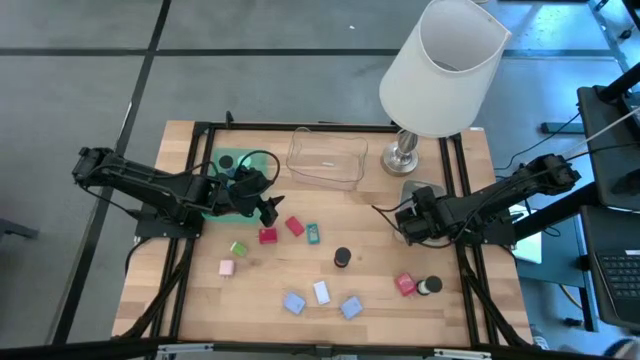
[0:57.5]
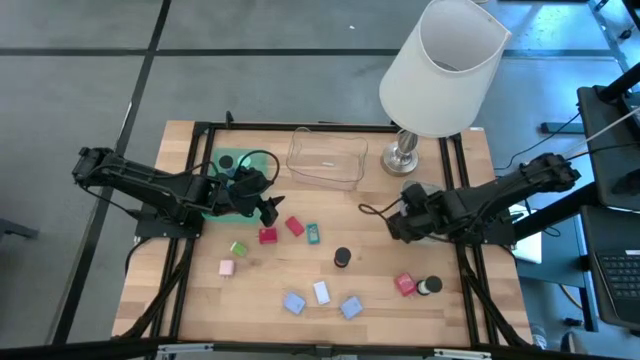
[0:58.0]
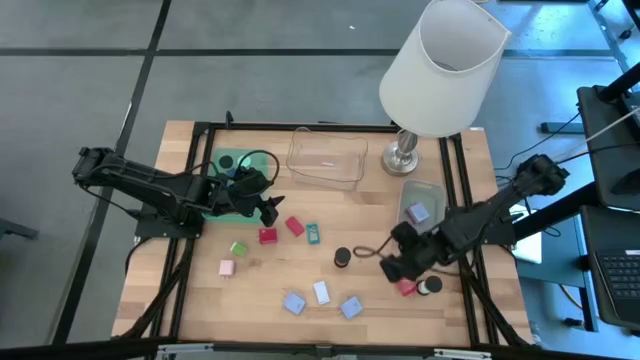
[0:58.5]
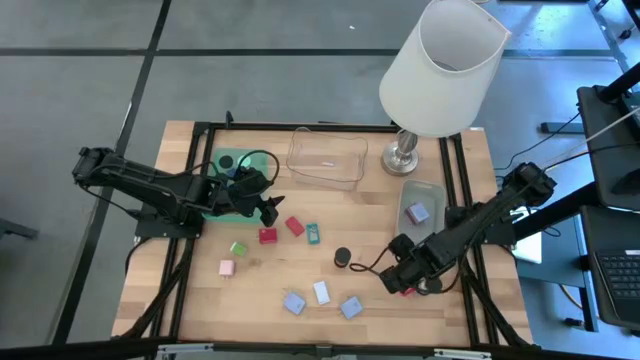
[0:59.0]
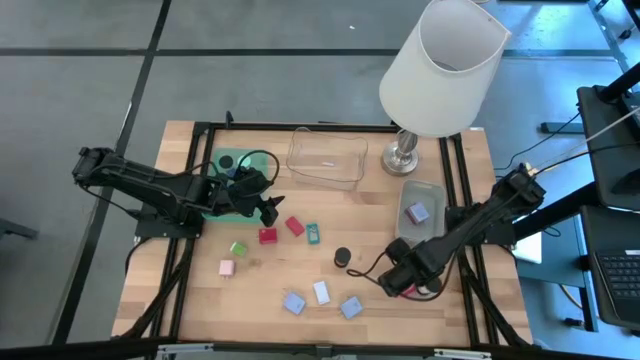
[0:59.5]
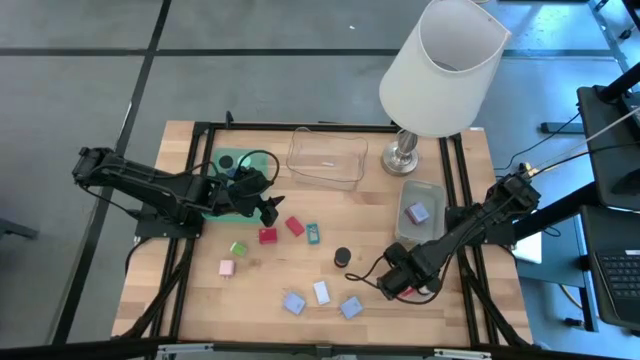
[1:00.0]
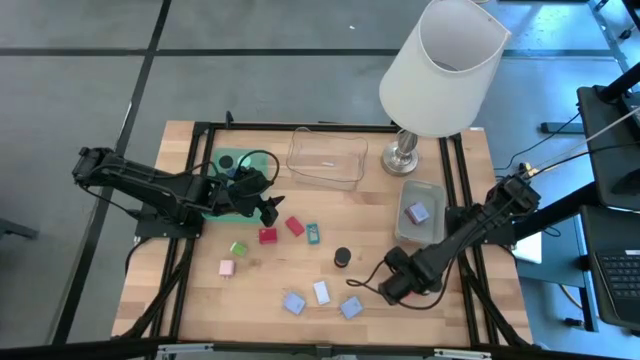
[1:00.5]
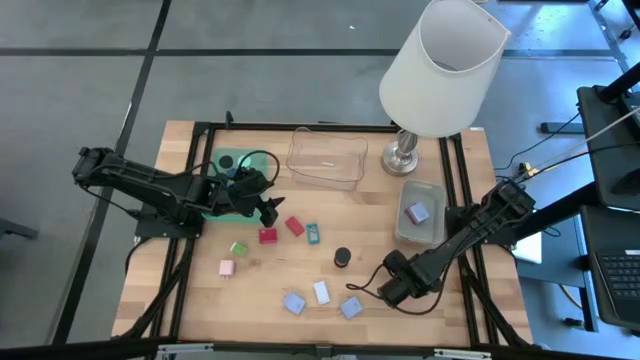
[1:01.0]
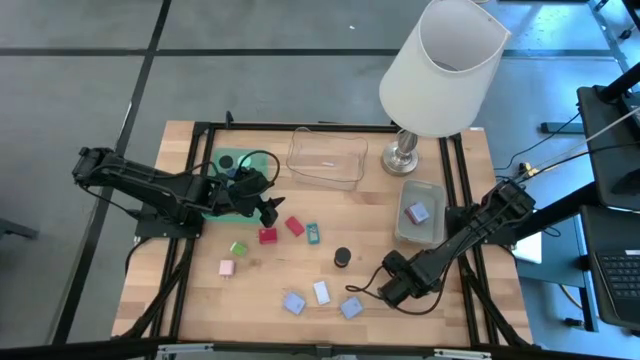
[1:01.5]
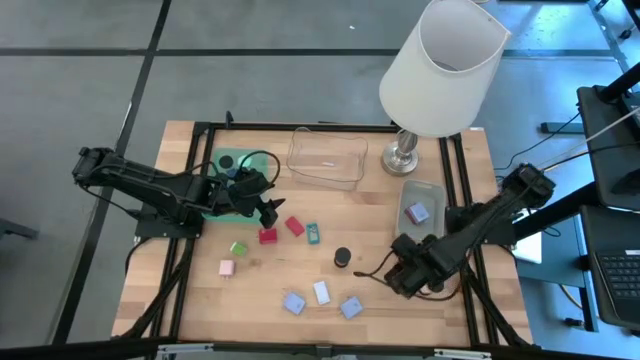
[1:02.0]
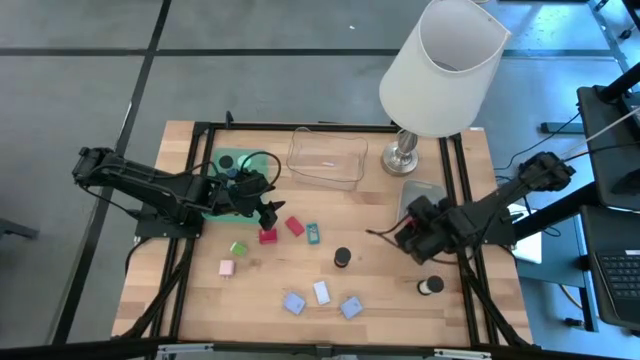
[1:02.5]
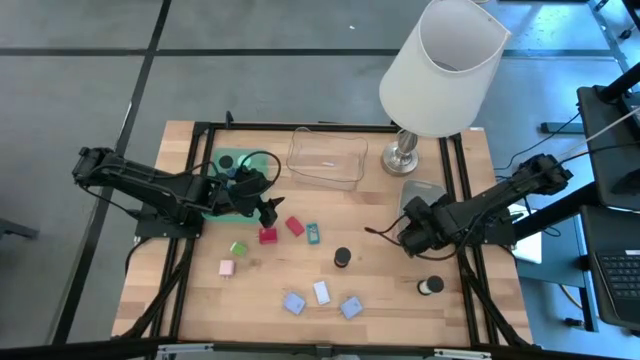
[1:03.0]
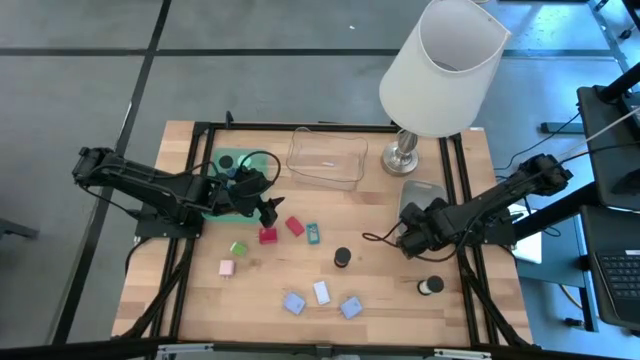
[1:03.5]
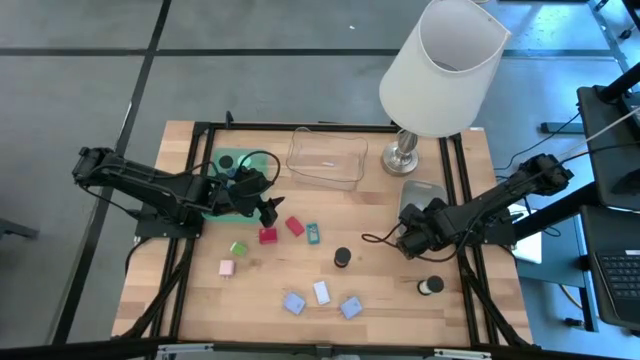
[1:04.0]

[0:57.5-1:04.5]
Task: Pick & Place Office items
Put the bottom right red charger adapter into the gray bin

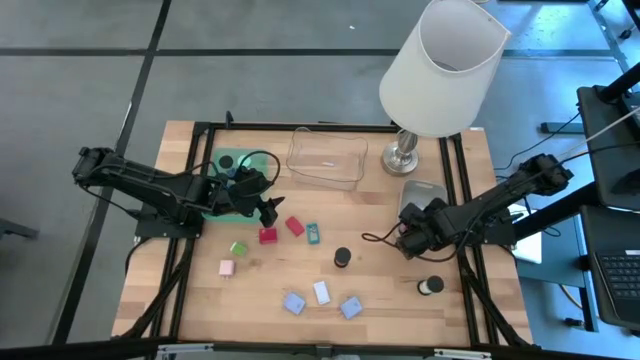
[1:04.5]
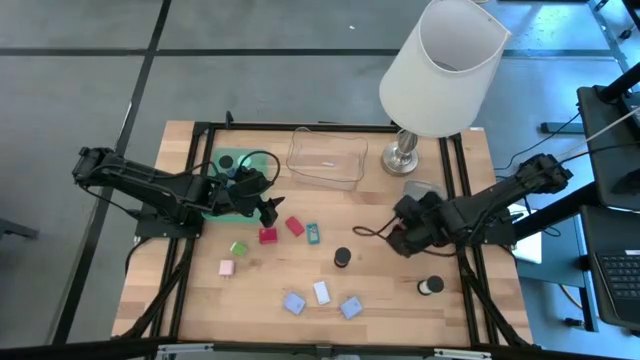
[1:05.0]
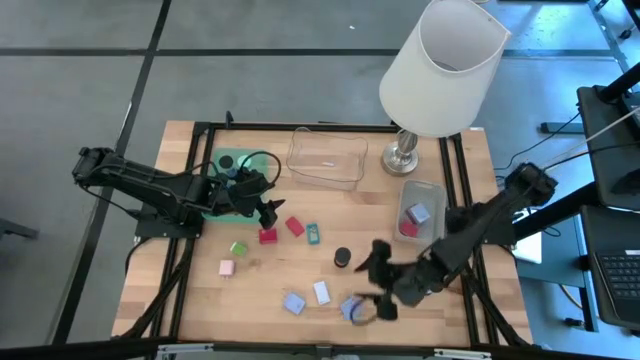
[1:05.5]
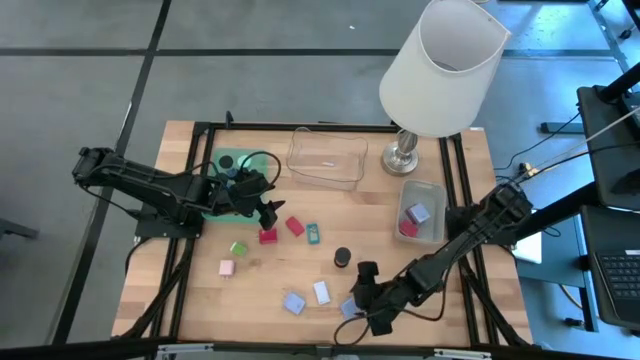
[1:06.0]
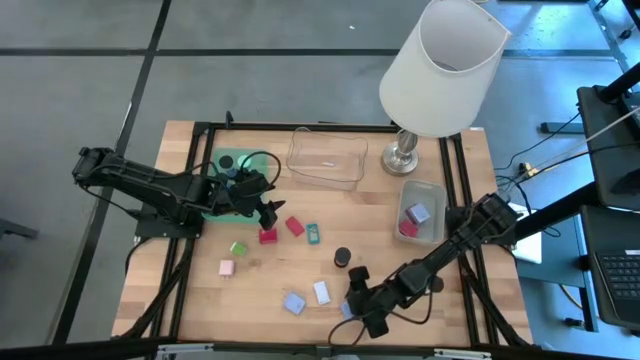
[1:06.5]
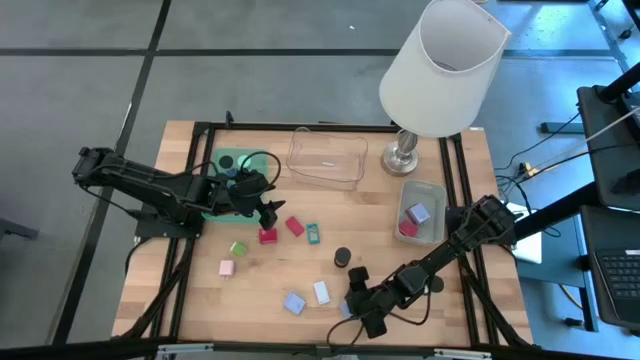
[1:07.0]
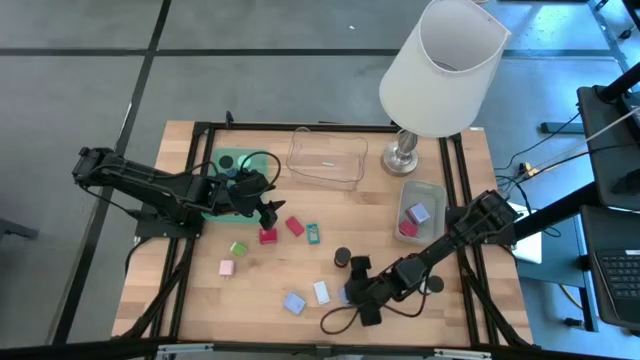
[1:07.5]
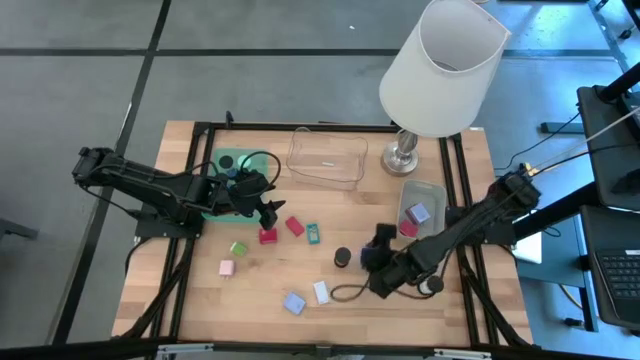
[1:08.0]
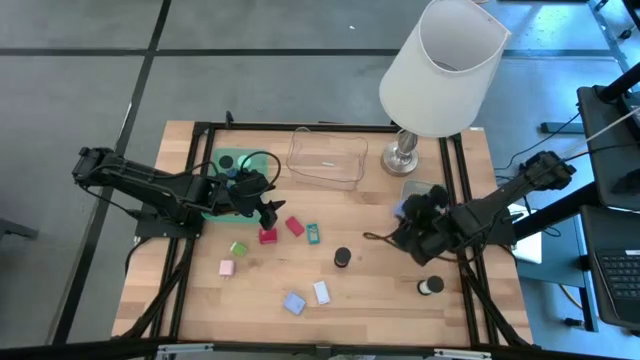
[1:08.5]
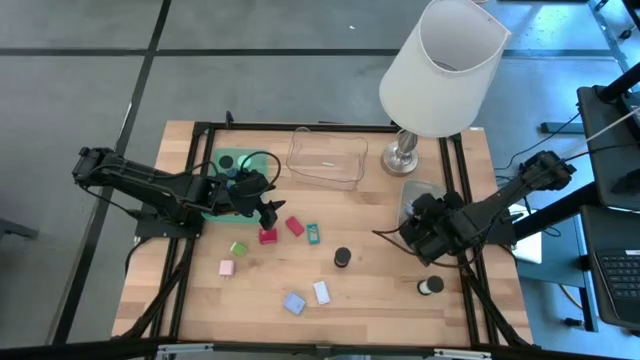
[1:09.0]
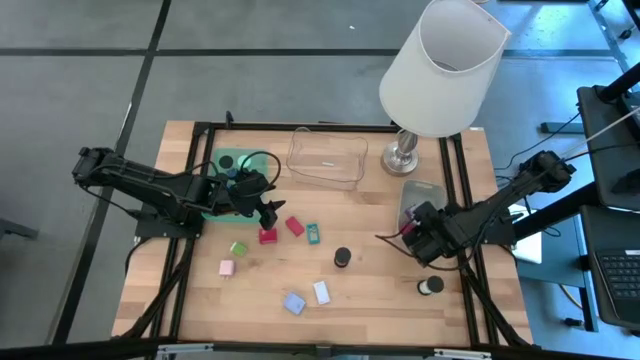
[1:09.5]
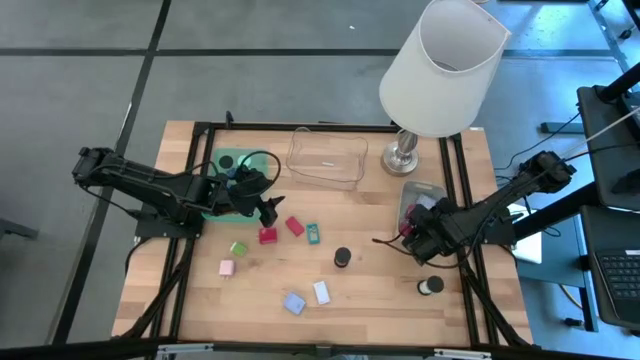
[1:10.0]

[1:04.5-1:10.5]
Put the right blue charger adapter into the gray bin

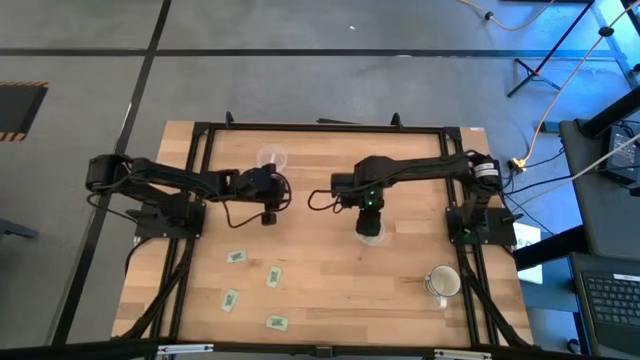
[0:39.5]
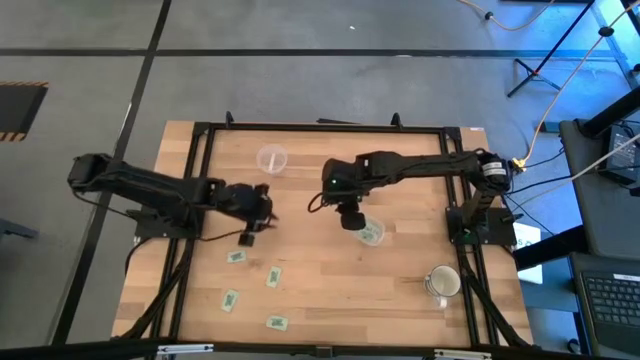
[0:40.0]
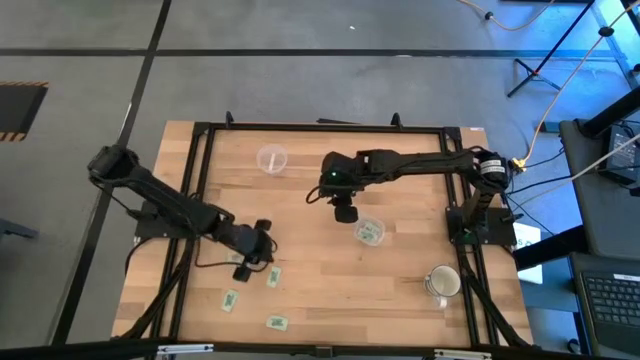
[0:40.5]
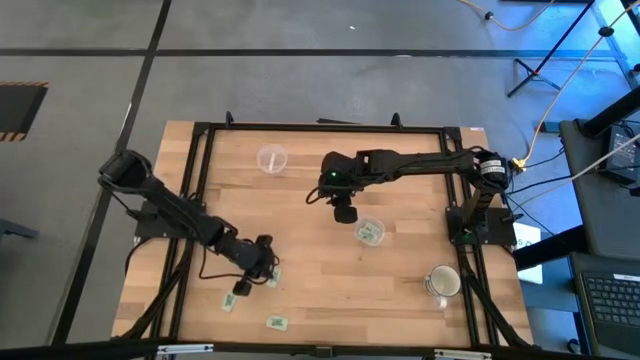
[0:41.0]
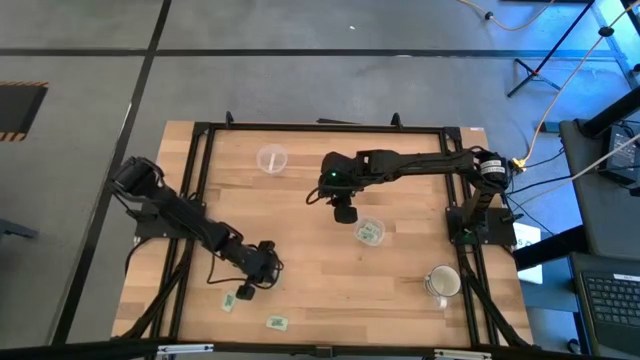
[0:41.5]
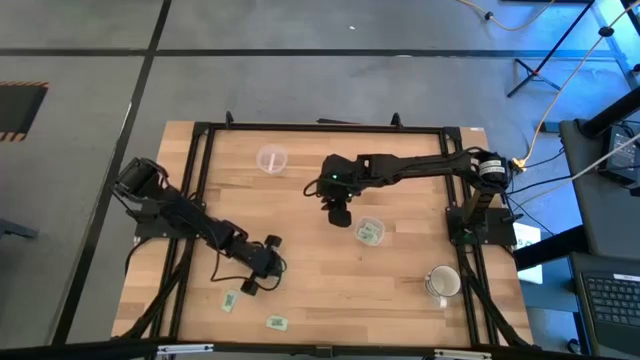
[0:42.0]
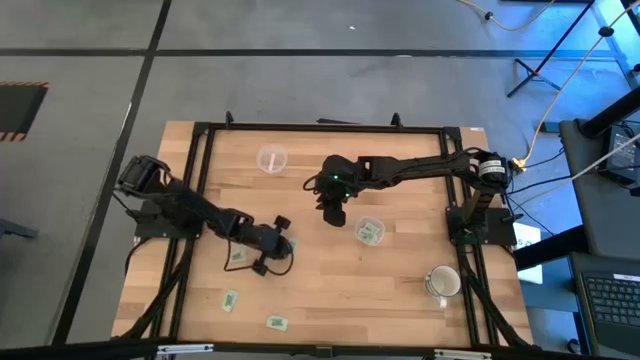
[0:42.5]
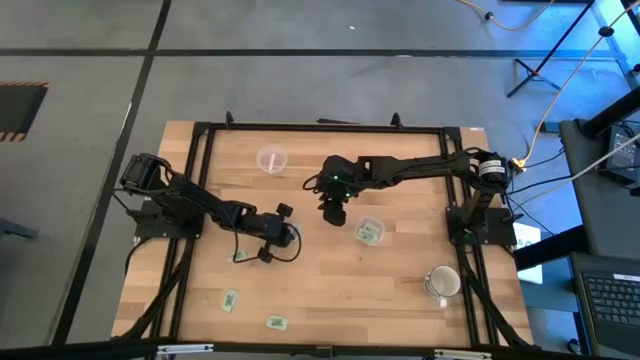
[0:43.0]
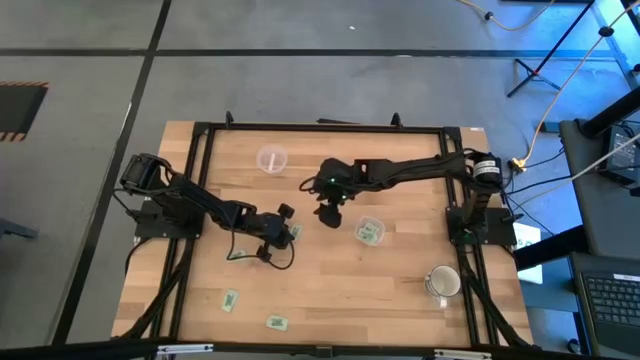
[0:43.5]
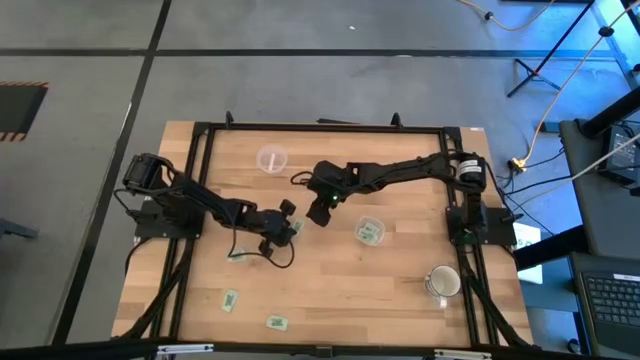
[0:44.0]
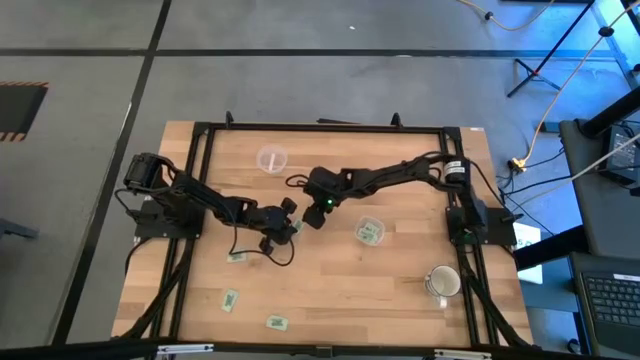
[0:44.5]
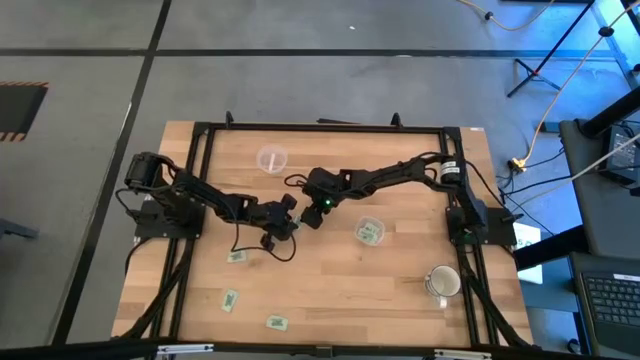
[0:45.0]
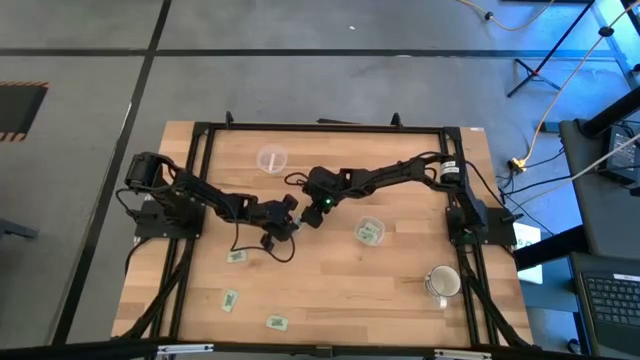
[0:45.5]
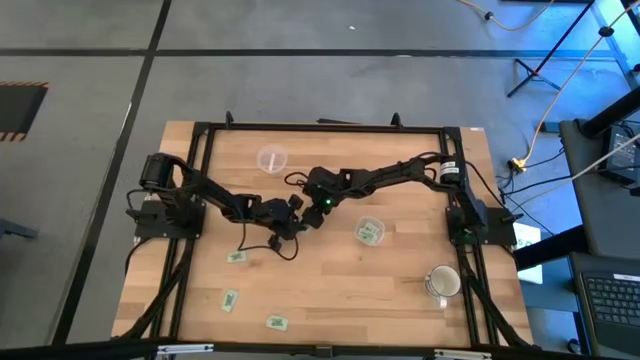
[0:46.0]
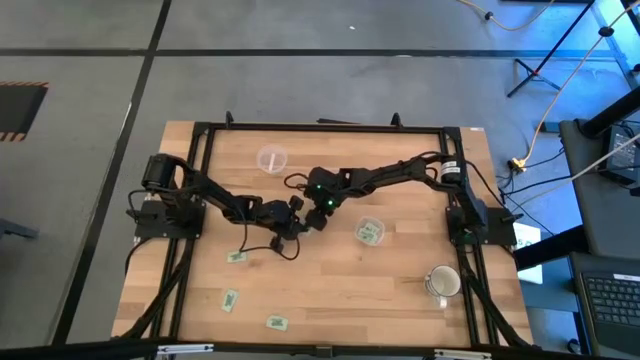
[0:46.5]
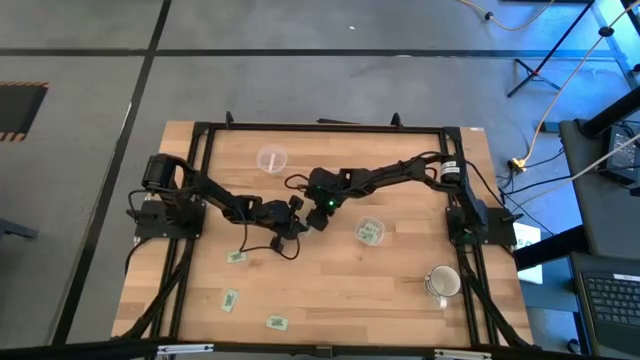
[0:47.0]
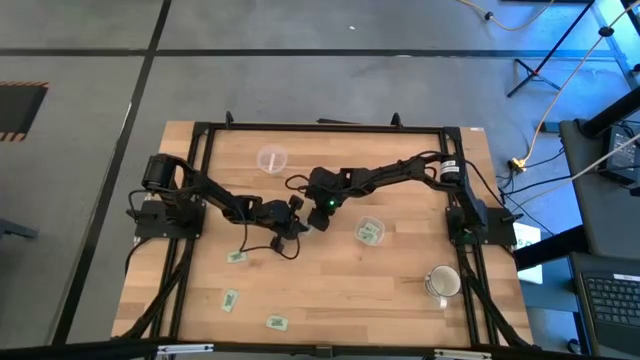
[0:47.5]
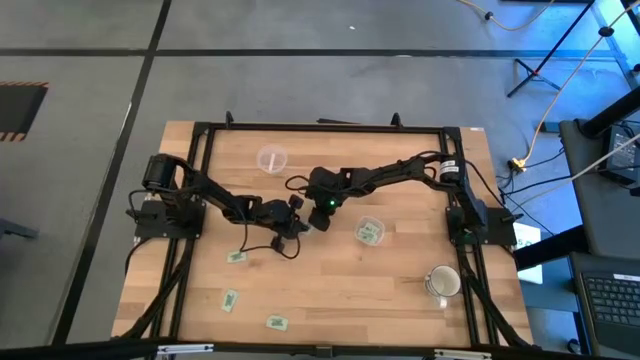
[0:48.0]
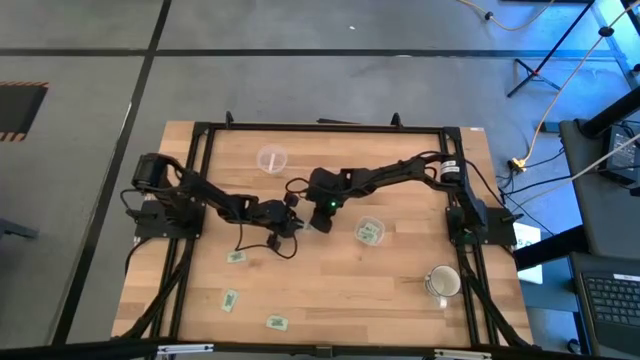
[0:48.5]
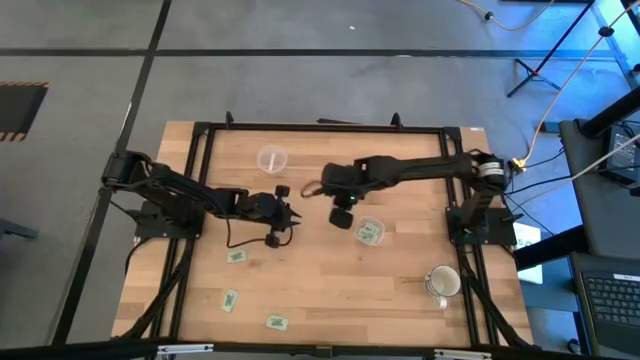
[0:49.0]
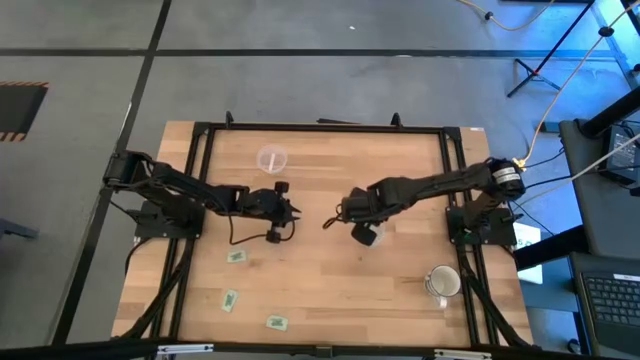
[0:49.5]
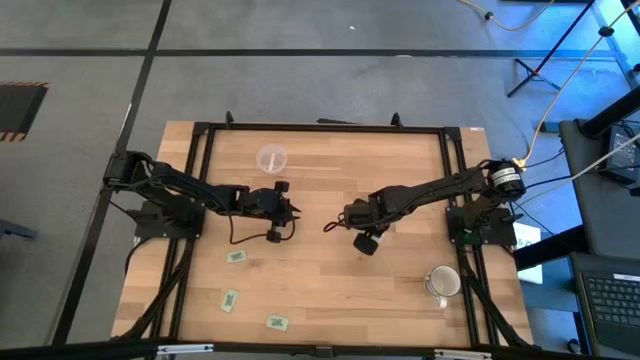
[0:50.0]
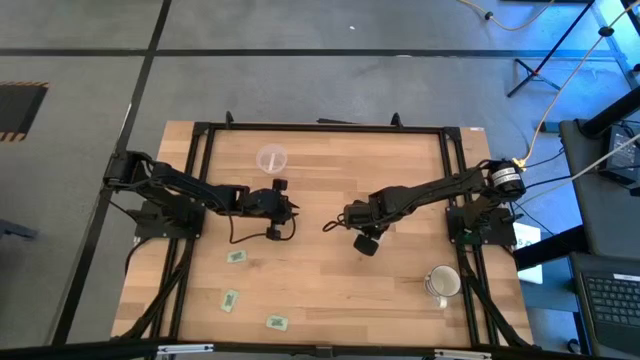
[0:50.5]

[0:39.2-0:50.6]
Task: Pick and place Stevia / Truvia into bins
Put the stevia packet into the bottom transparent container
